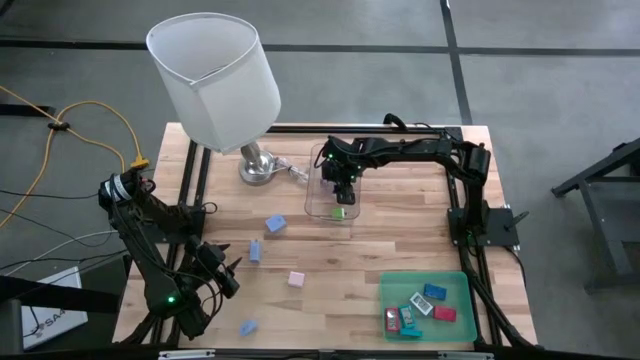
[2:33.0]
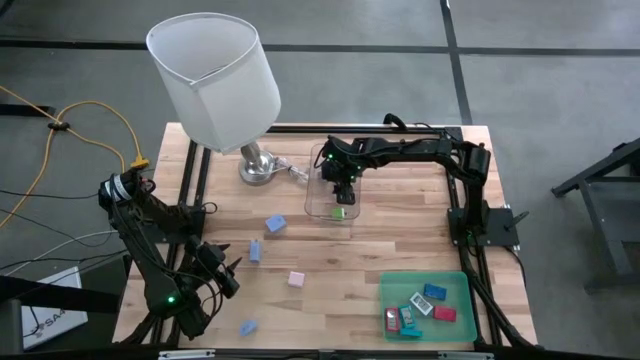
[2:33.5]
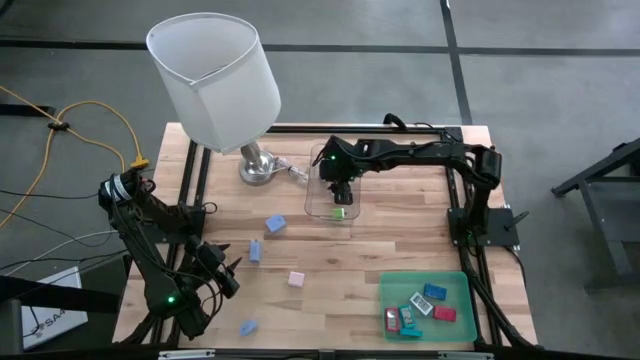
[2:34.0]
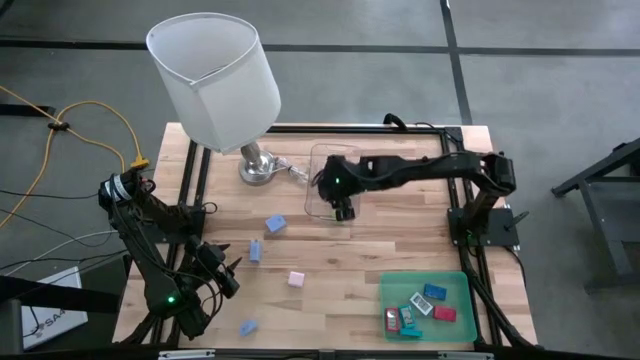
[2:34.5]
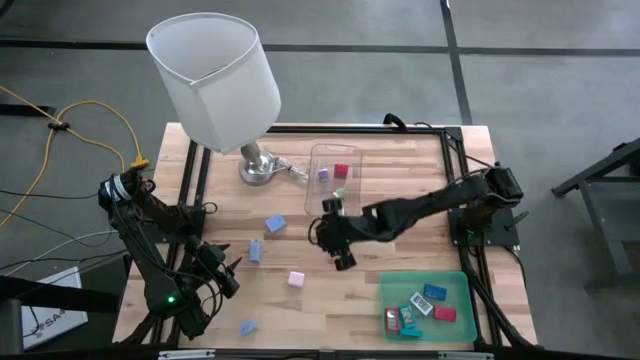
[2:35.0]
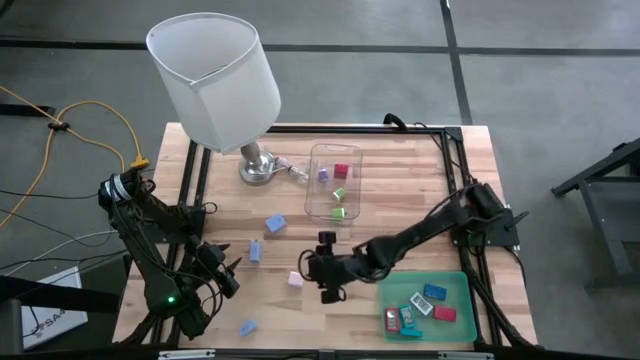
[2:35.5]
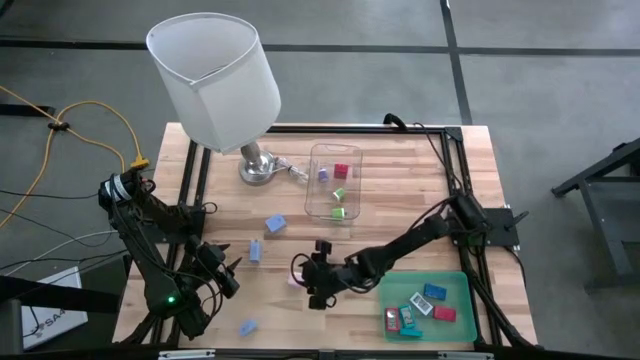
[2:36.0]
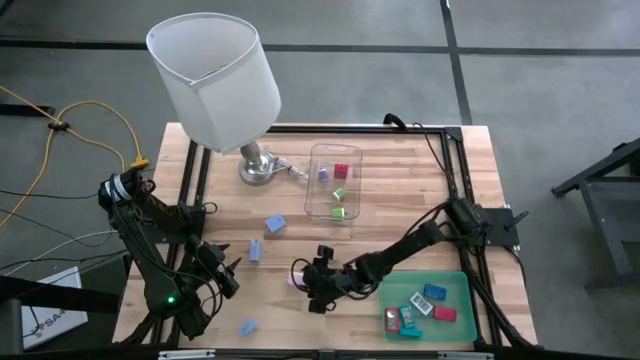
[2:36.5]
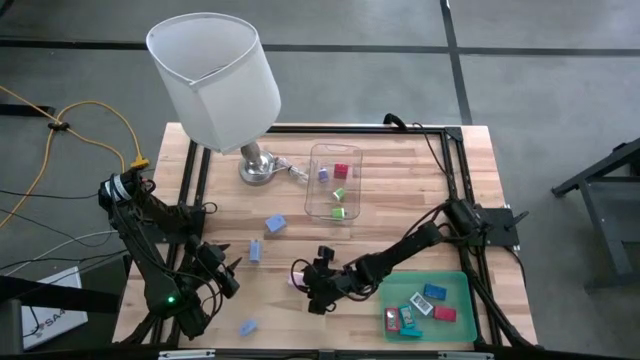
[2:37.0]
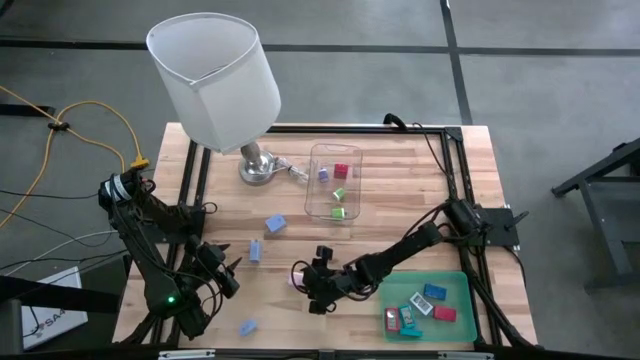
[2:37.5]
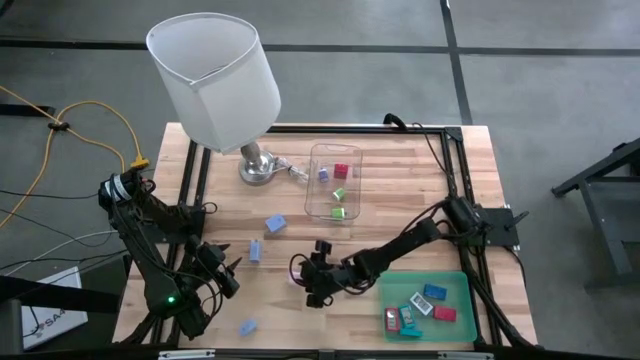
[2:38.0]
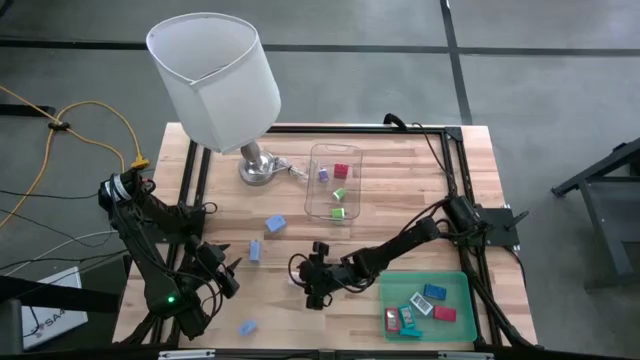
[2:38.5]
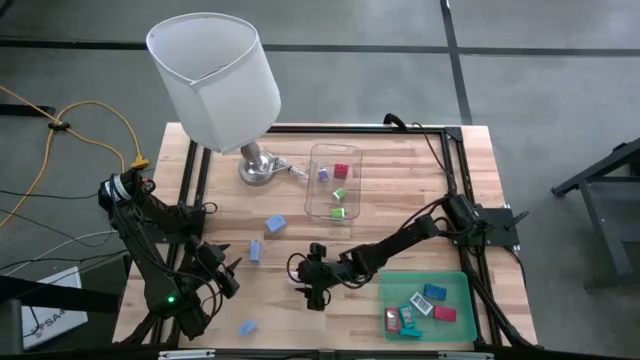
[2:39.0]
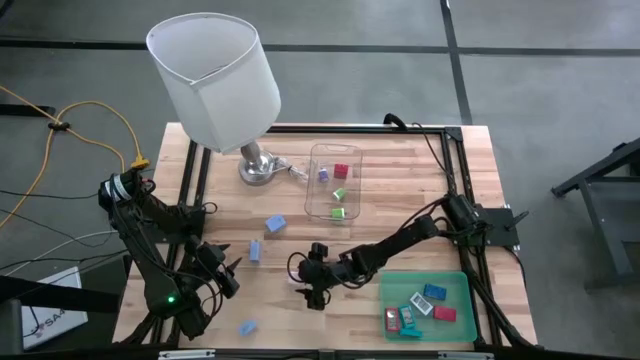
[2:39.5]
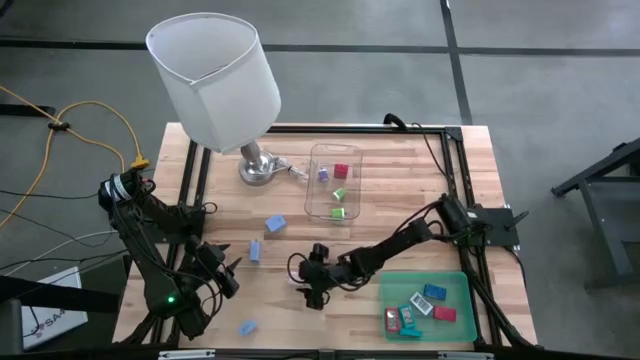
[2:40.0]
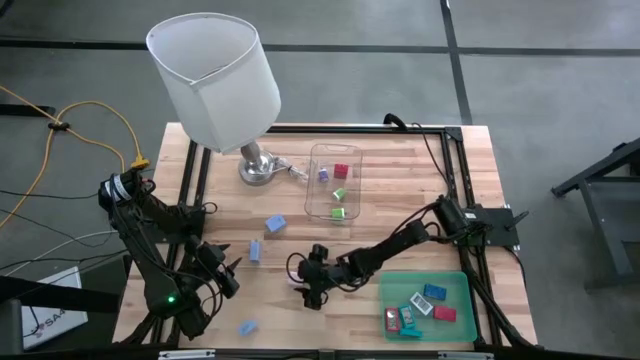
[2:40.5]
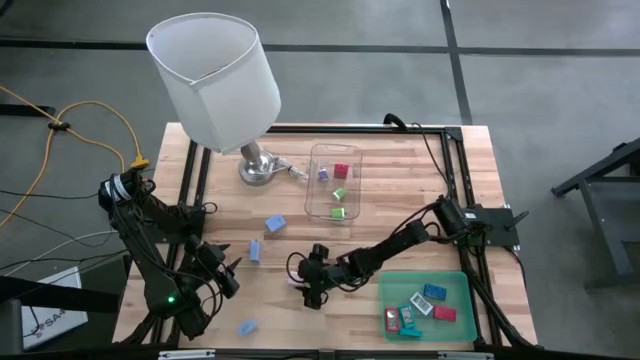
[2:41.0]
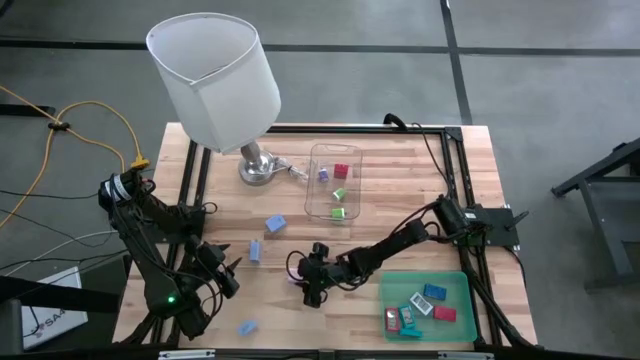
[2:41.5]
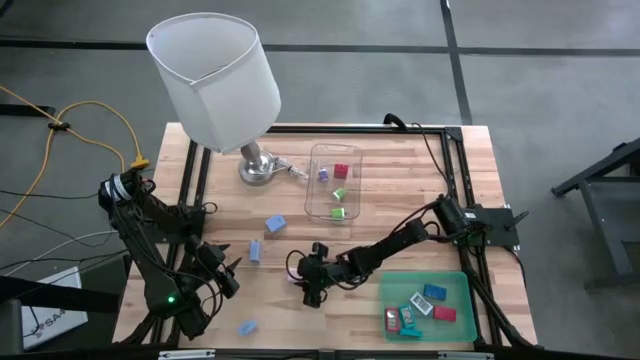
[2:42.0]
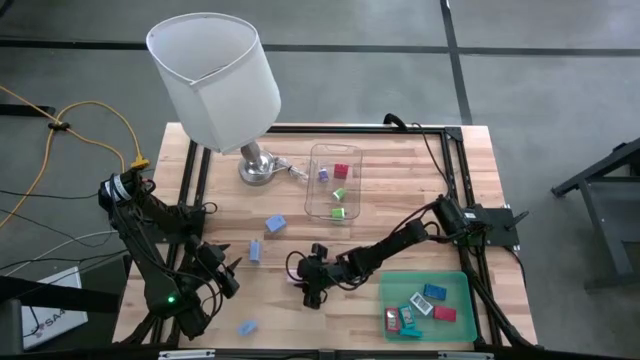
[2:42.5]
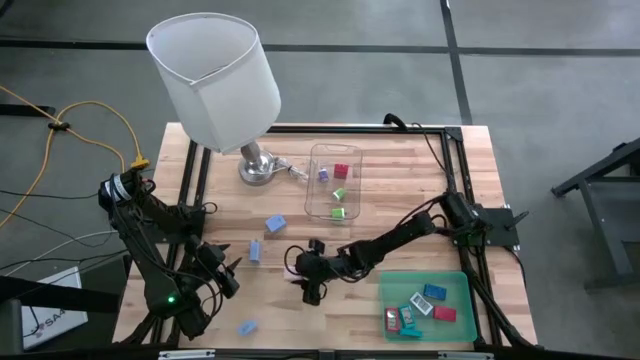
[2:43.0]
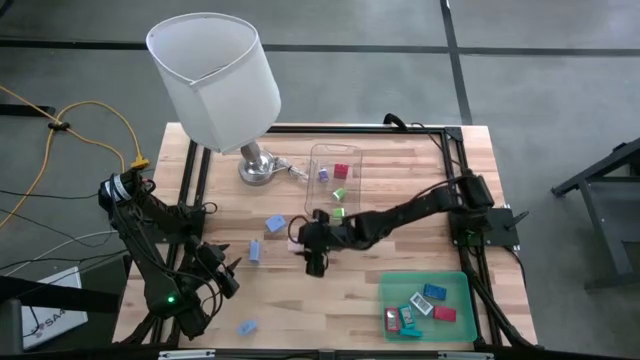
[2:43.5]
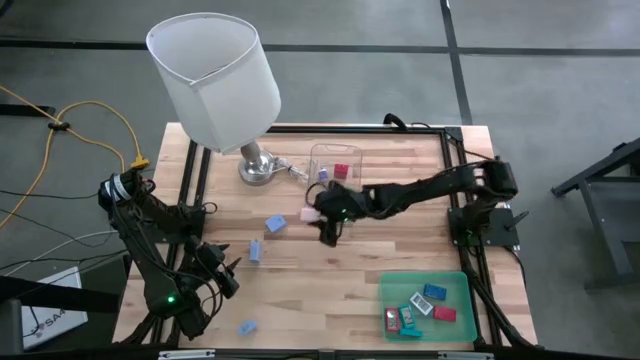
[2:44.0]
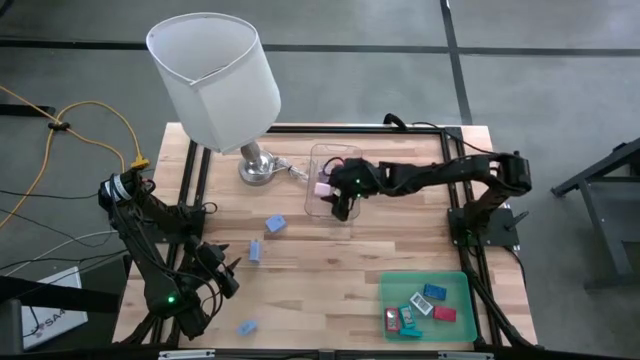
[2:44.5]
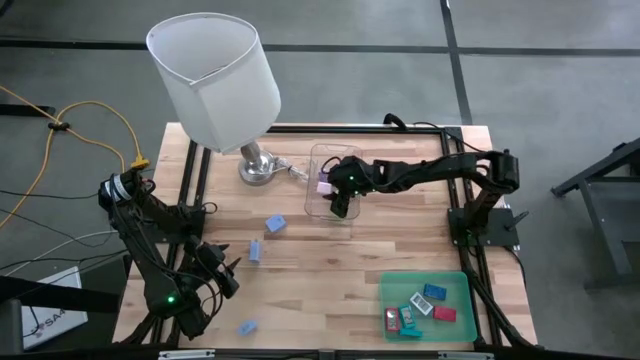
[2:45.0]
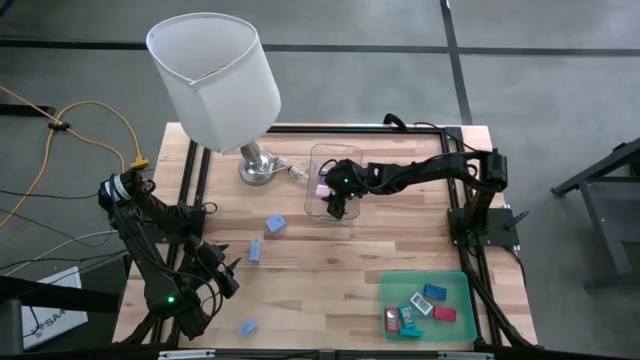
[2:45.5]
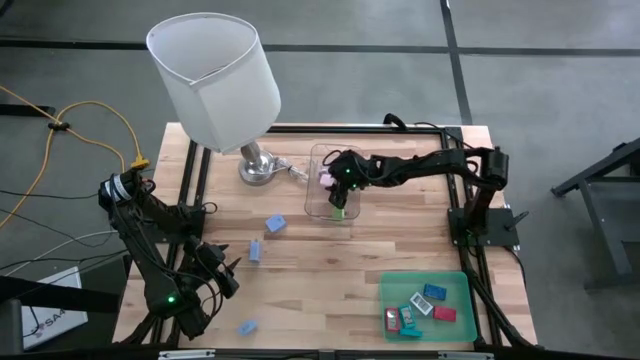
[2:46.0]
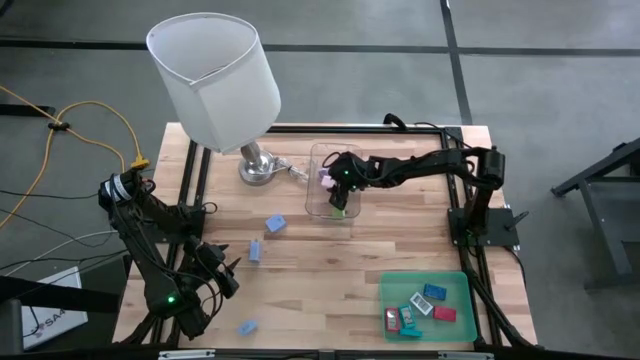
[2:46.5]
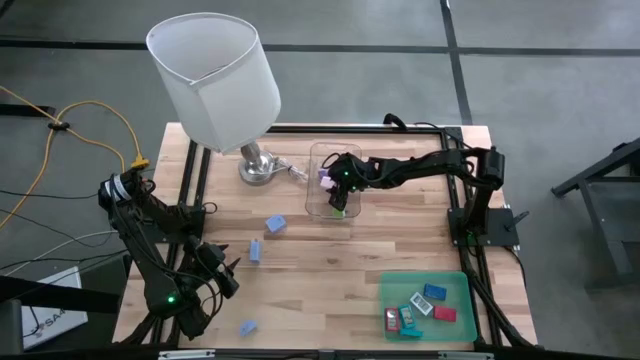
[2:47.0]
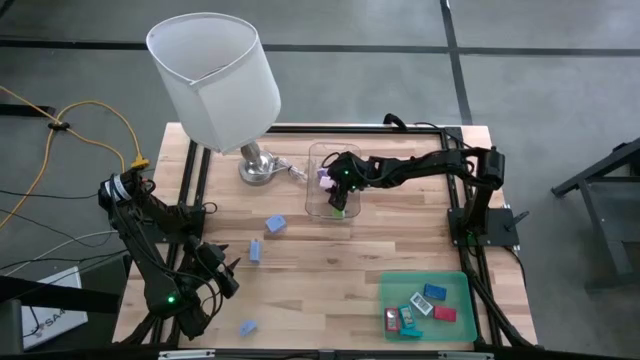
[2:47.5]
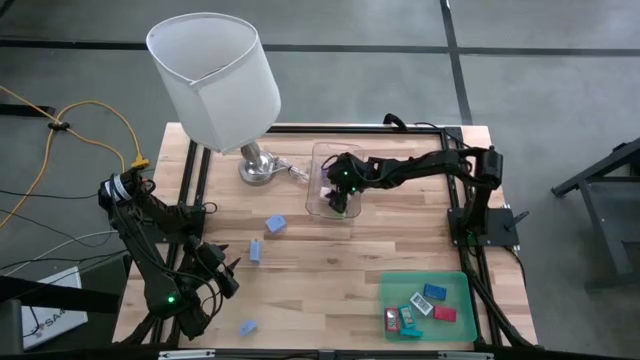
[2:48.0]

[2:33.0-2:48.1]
Task: Pick & Place Office items
Put the white charger adapter into the transparent bin

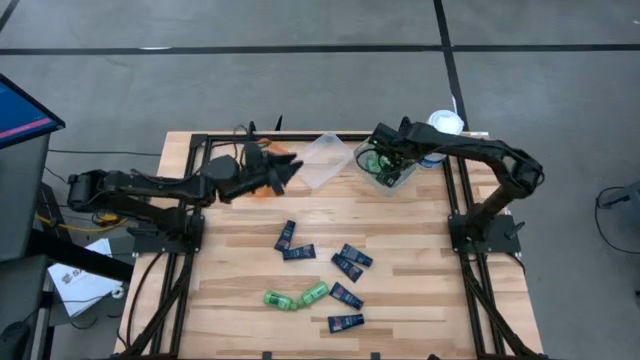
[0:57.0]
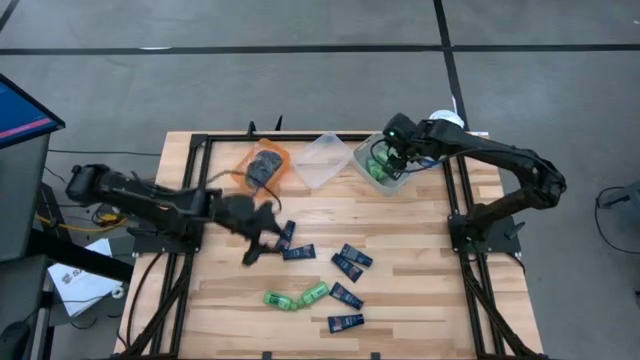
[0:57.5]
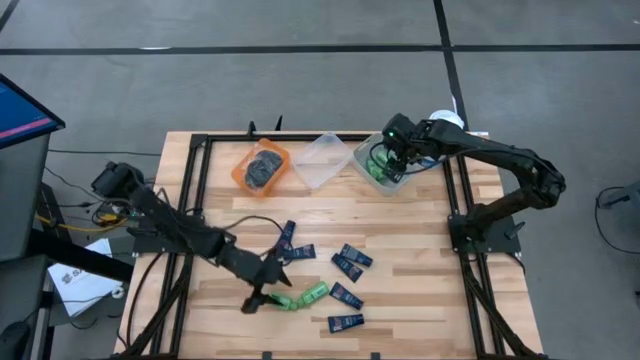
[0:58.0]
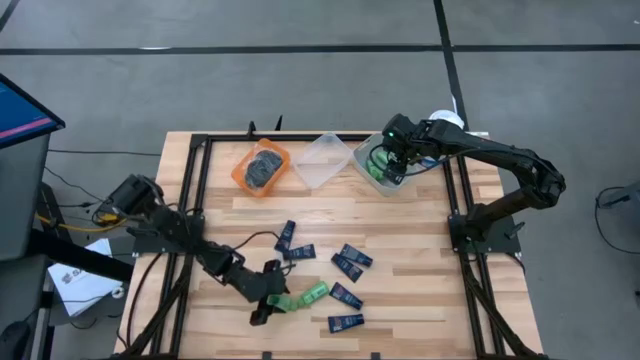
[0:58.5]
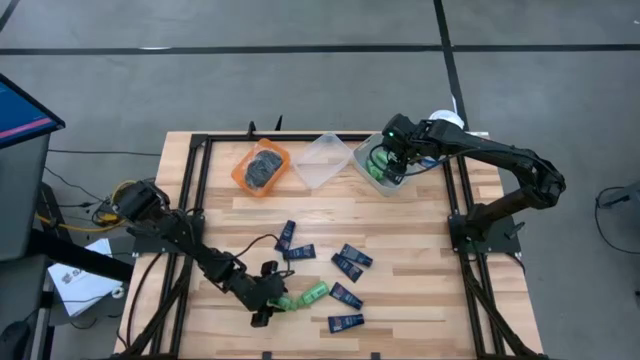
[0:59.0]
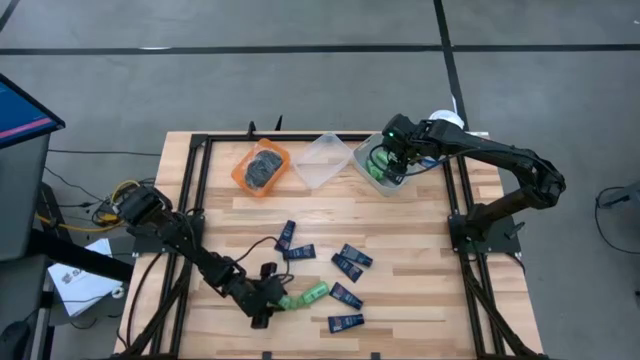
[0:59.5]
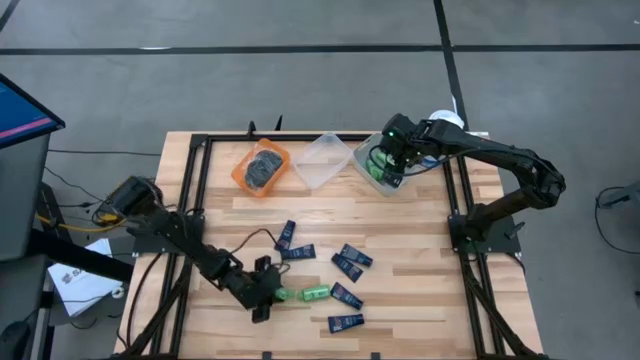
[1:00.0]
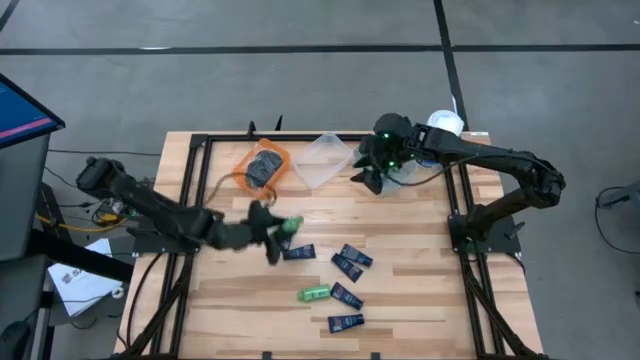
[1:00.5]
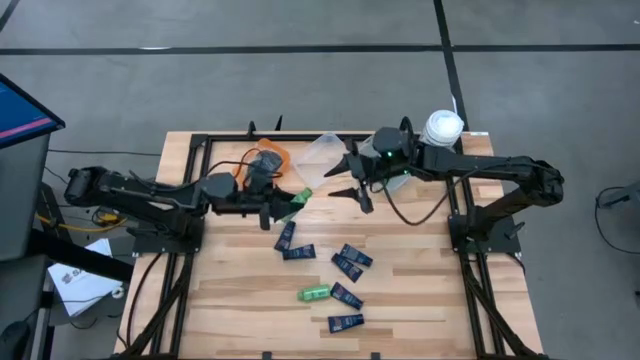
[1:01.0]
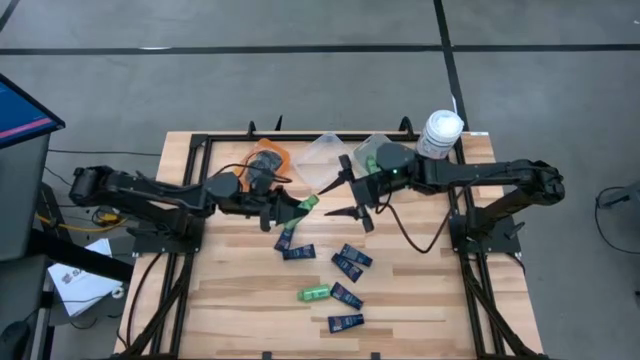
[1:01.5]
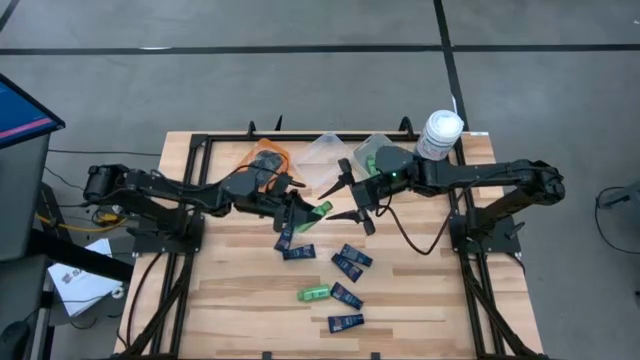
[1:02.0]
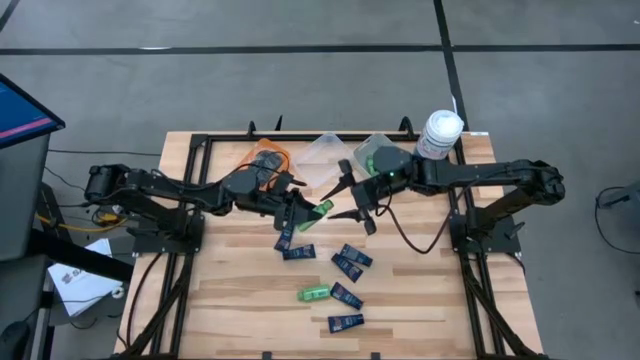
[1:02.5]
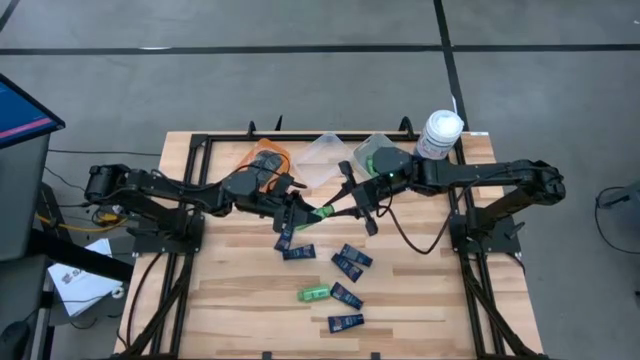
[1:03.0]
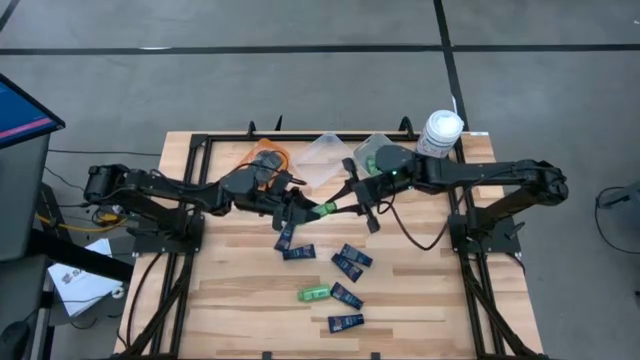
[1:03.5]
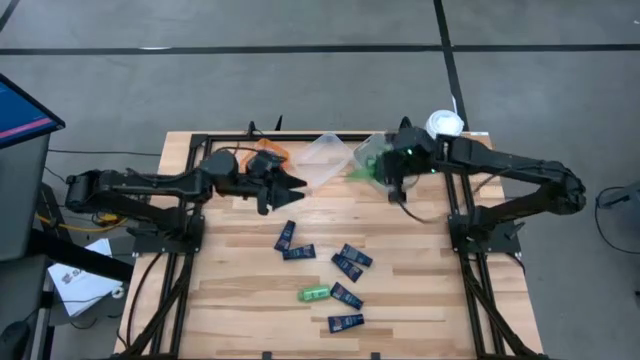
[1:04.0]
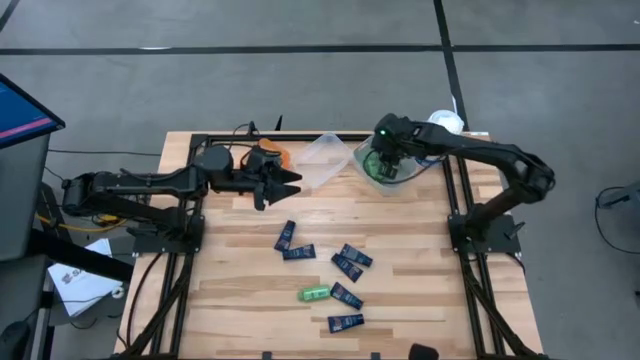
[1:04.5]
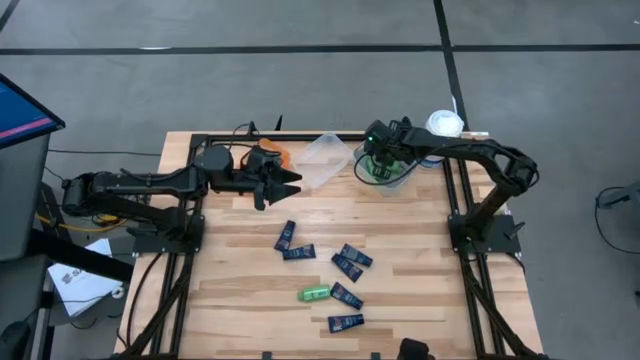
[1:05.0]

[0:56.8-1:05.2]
Task: Pick & Place Travel size toiletries
Put the green shampoo into the gray bin
